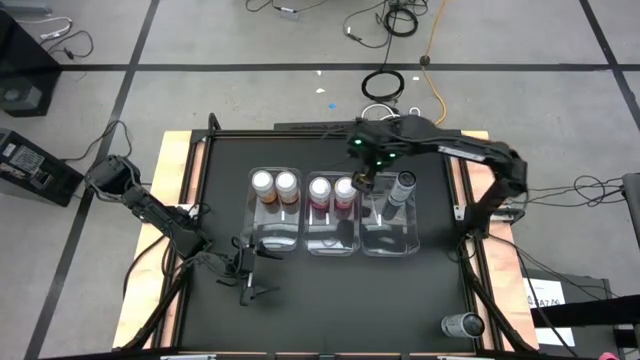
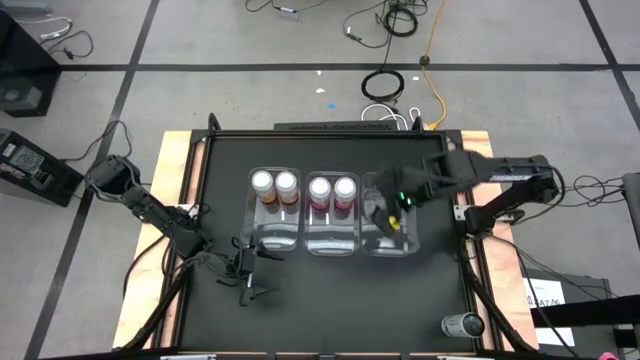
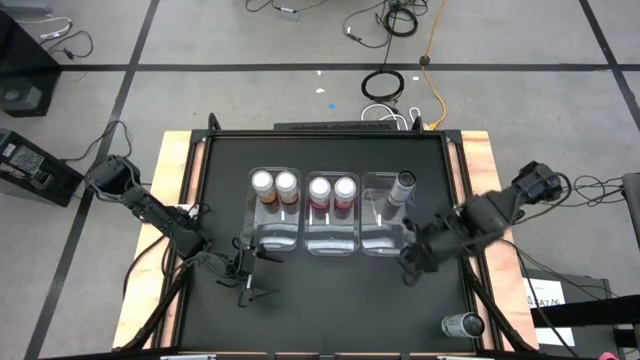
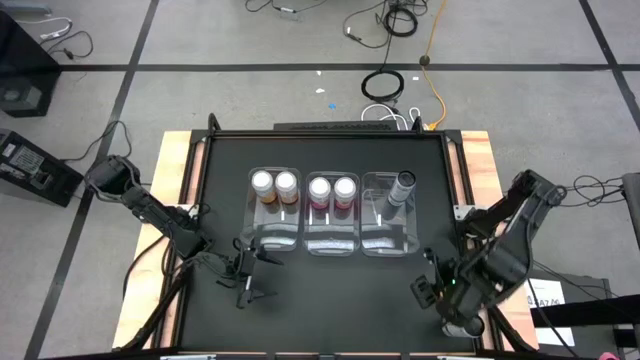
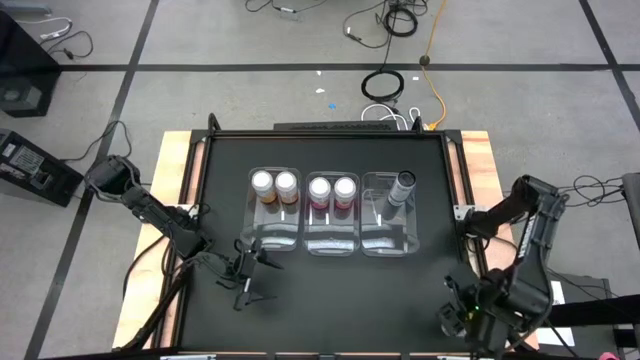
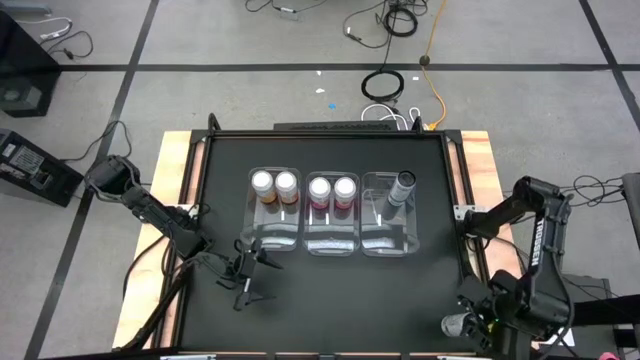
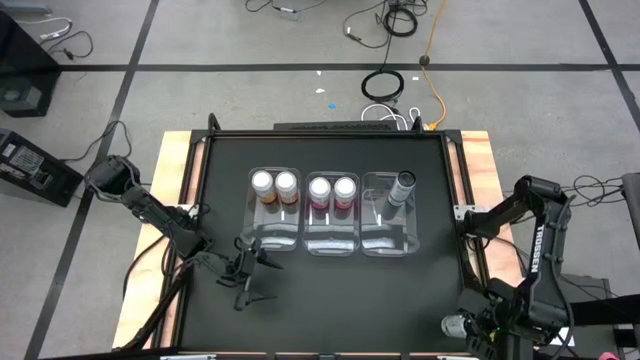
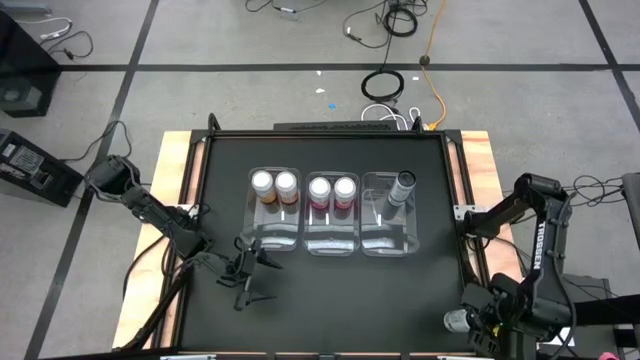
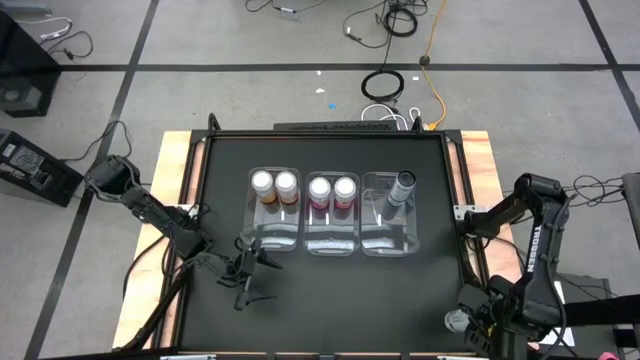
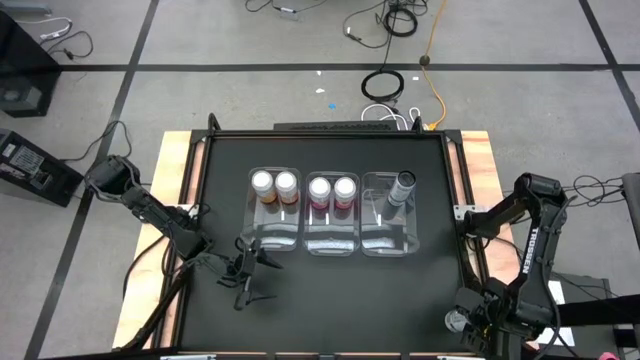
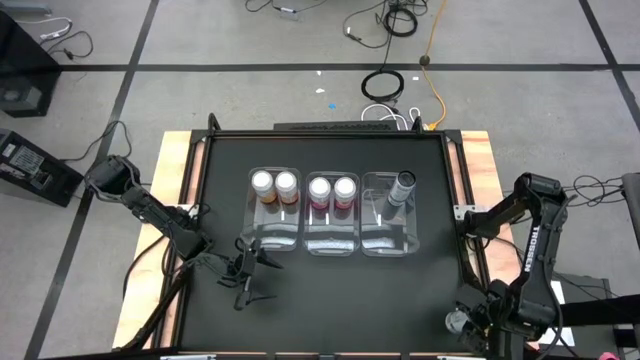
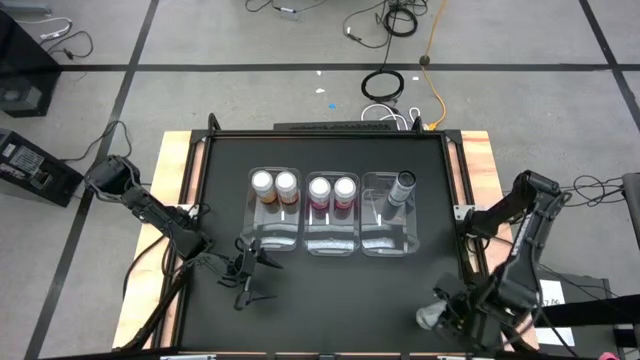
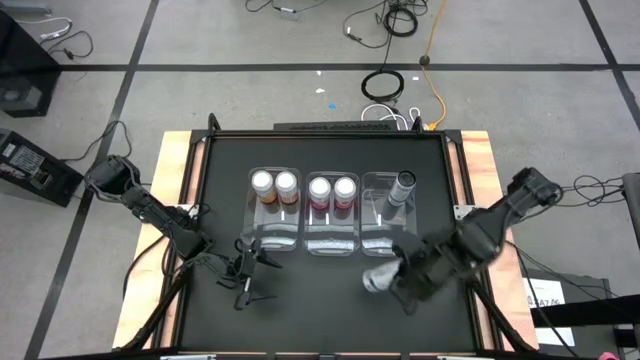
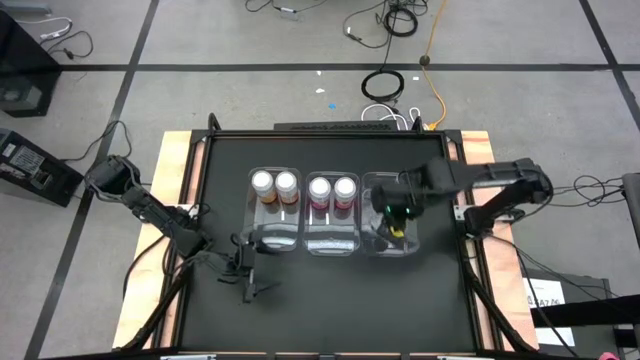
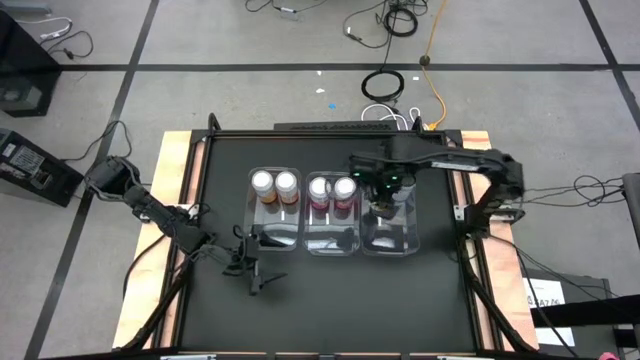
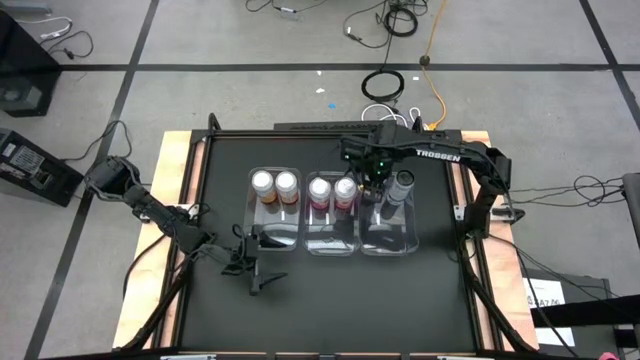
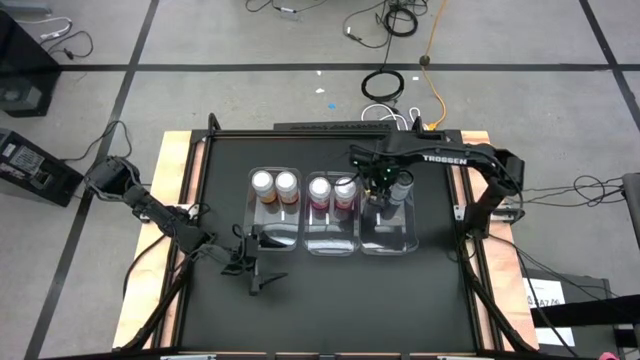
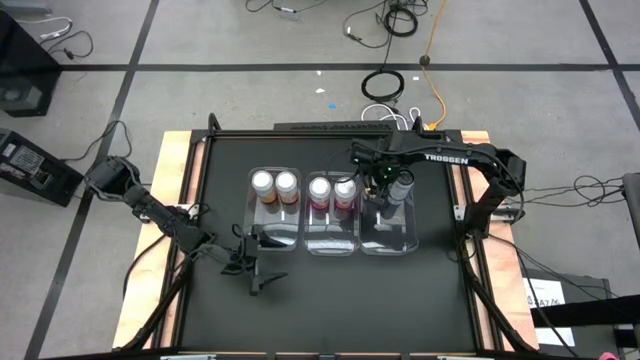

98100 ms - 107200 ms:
Task: Sort soda cans
Put the right white-blue soda can into the middle right transparent bin

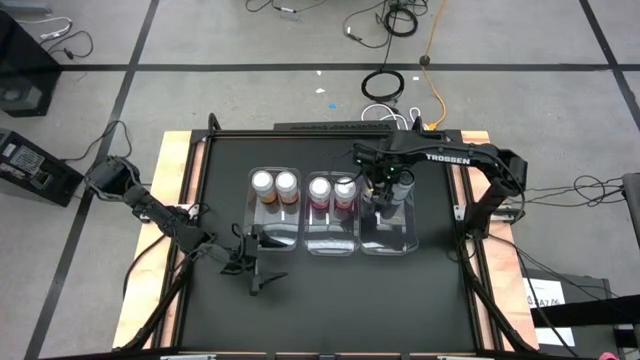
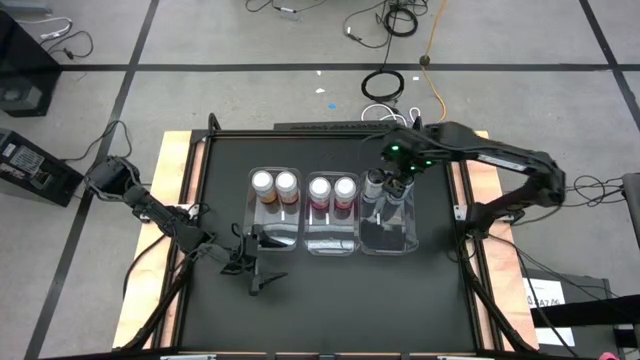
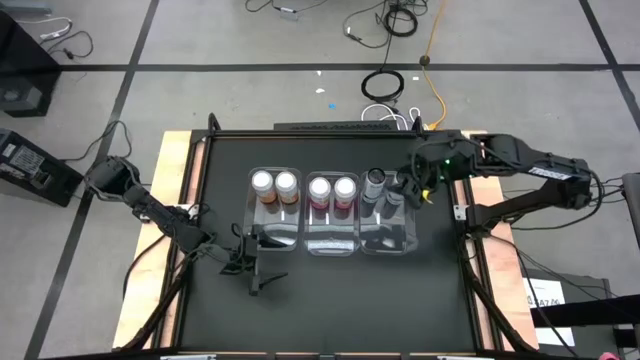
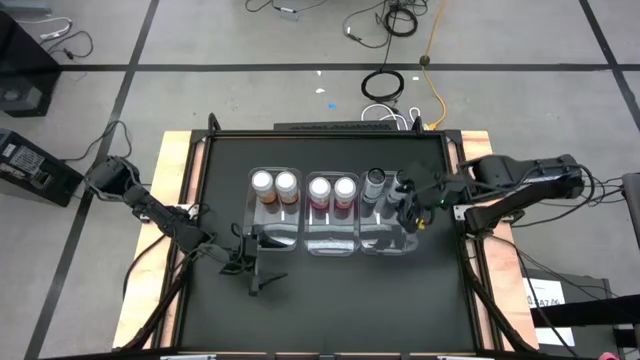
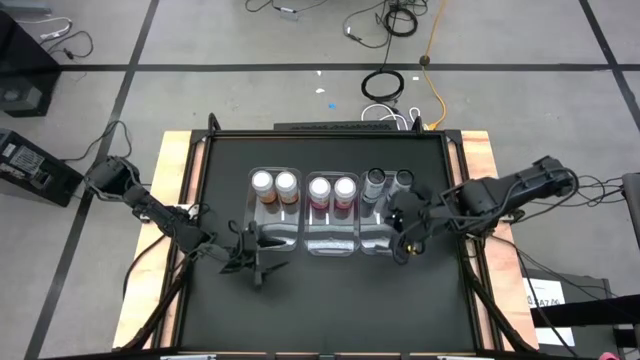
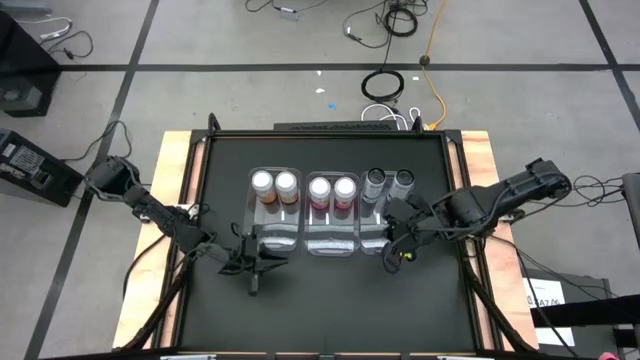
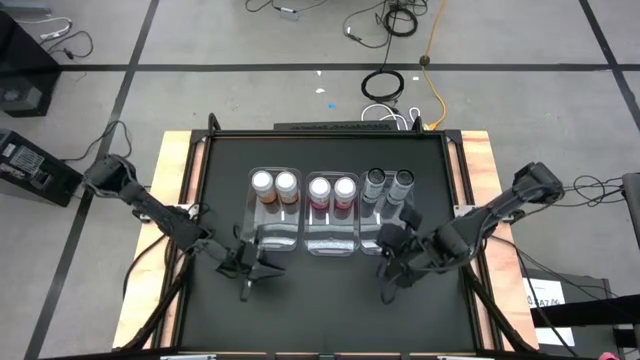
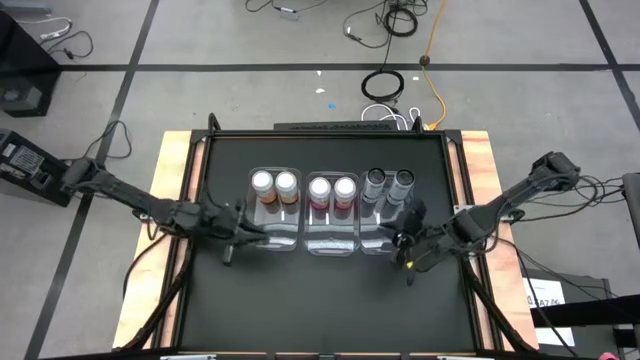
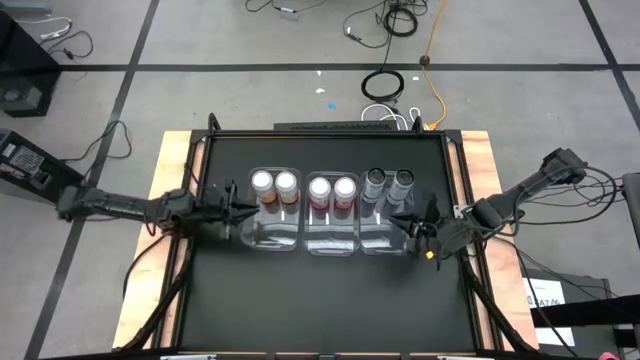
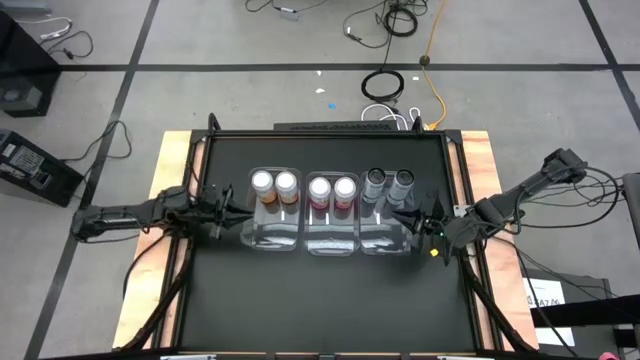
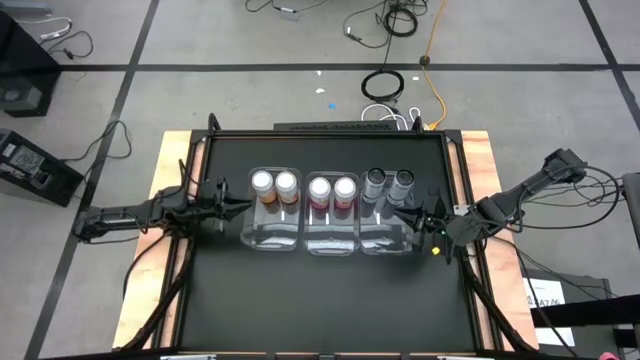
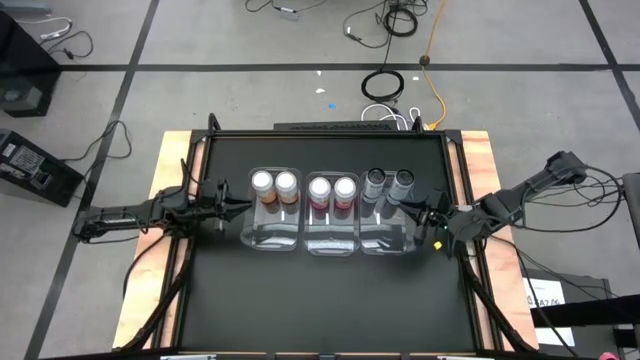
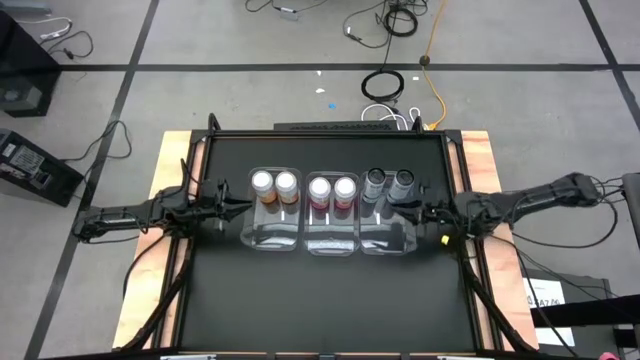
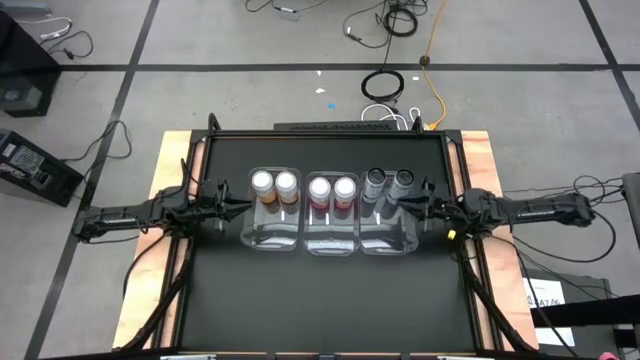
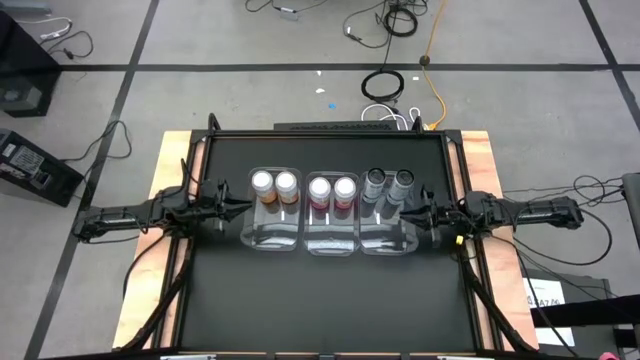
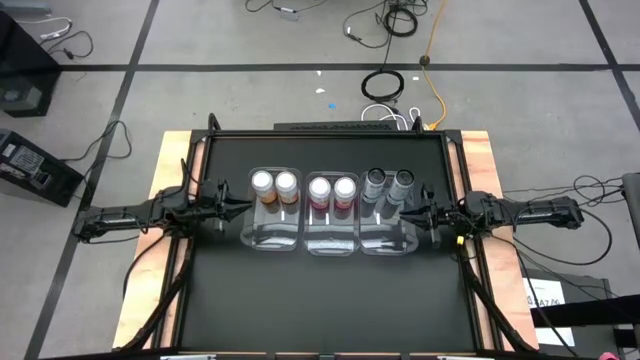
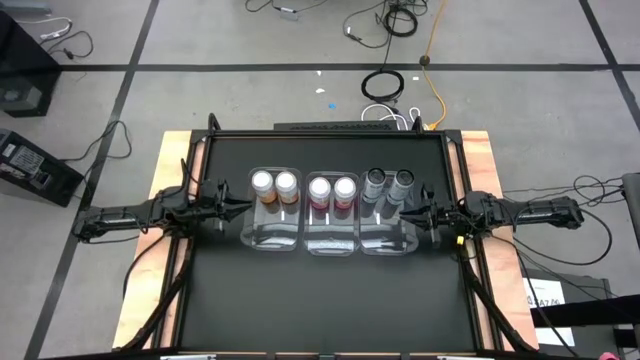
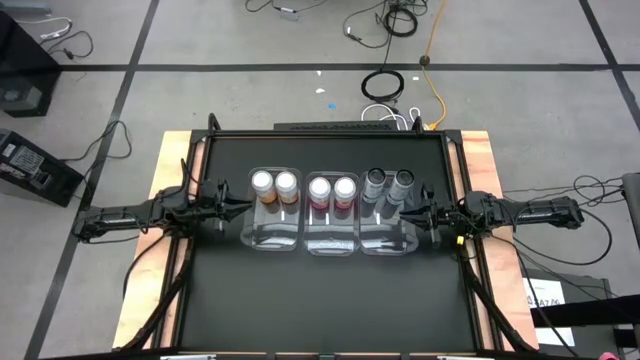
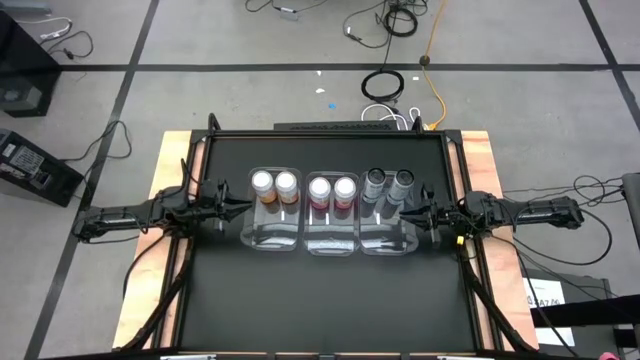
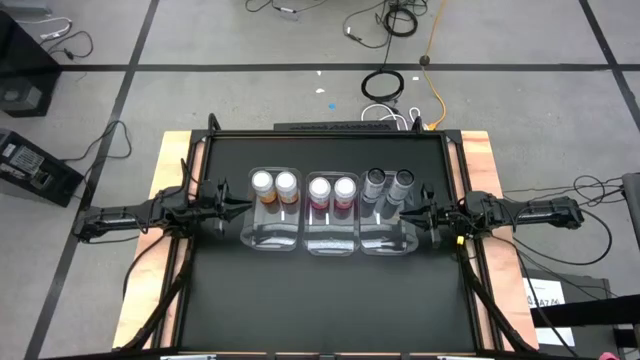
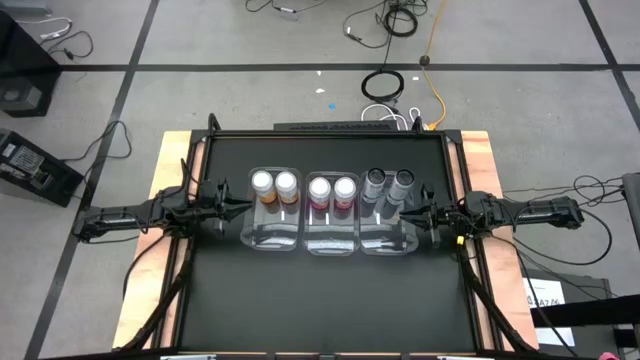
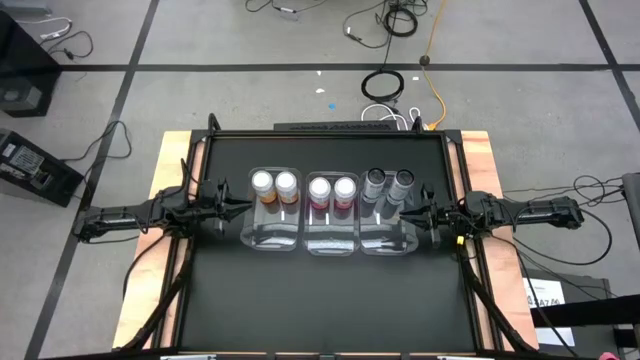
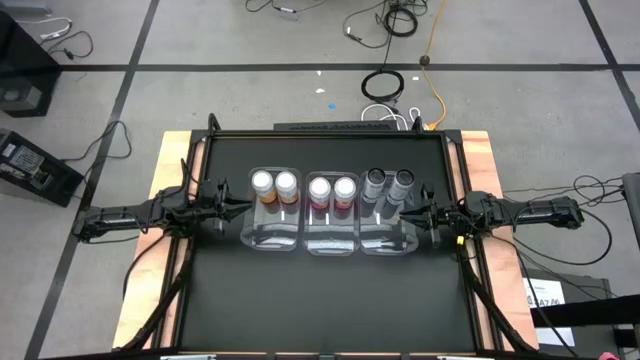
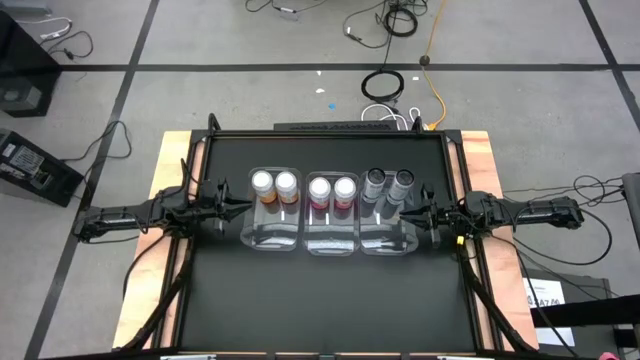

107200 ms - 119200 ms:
Return to Home Position
